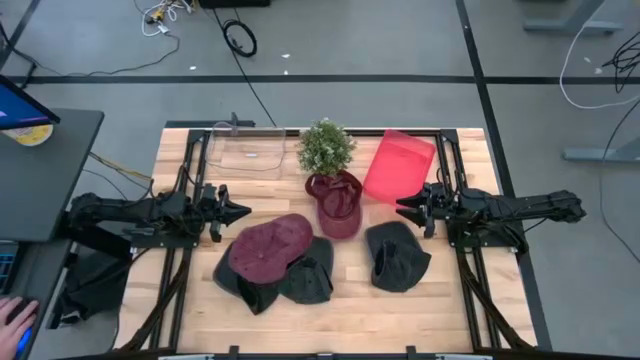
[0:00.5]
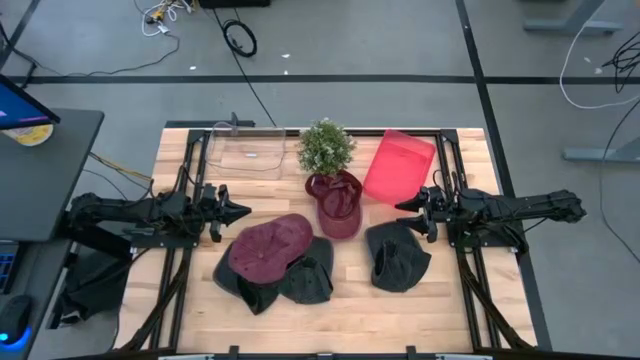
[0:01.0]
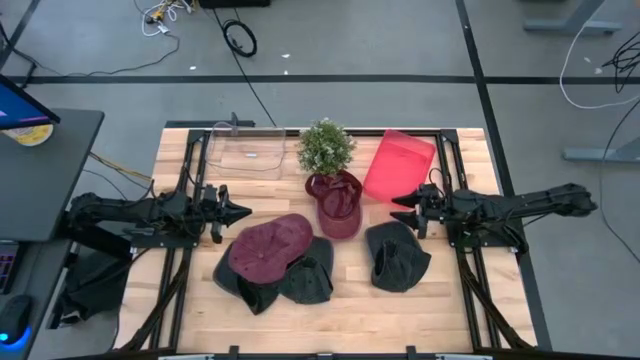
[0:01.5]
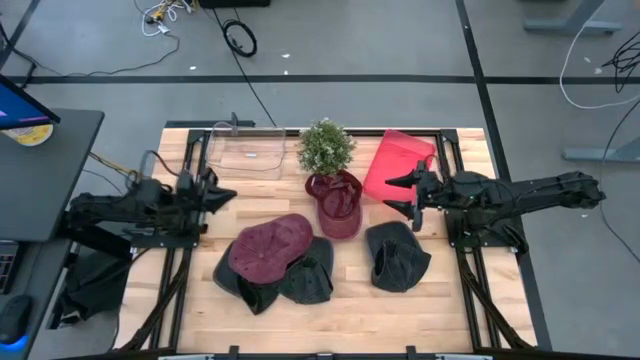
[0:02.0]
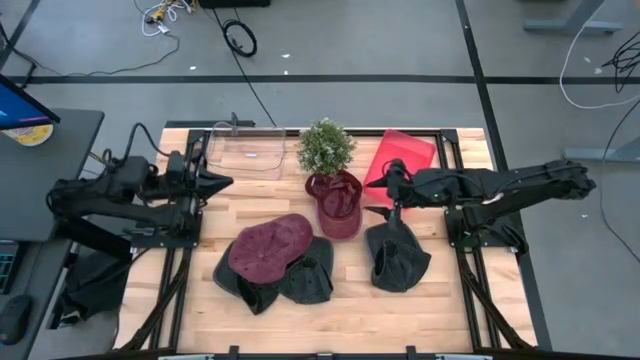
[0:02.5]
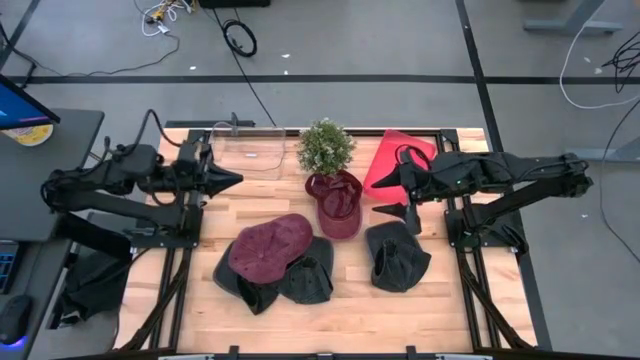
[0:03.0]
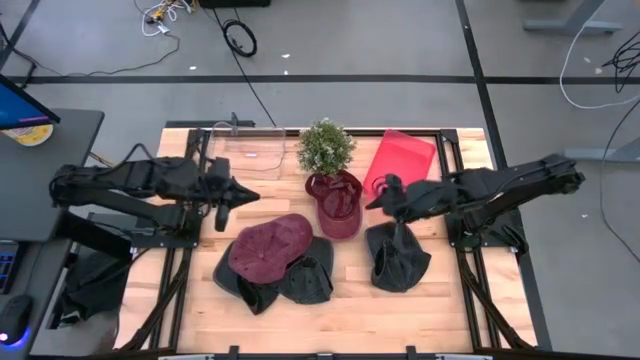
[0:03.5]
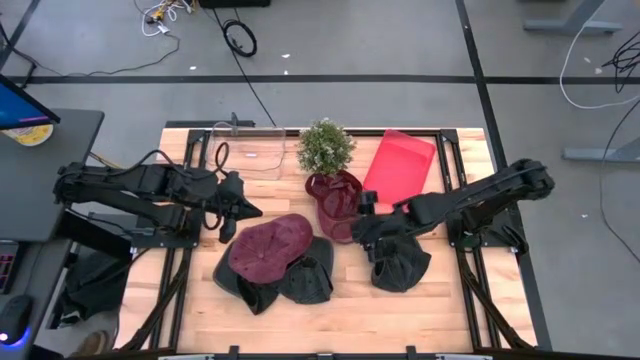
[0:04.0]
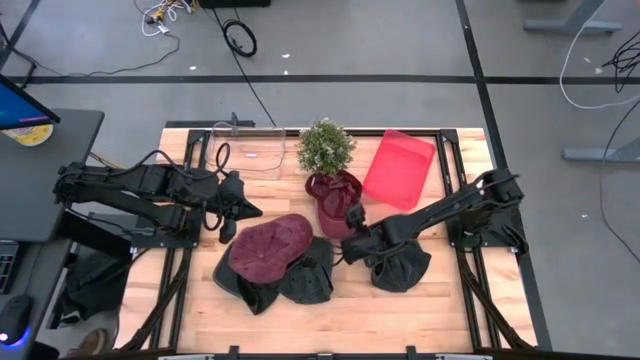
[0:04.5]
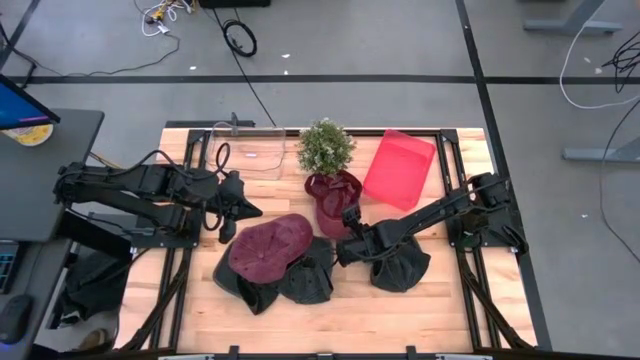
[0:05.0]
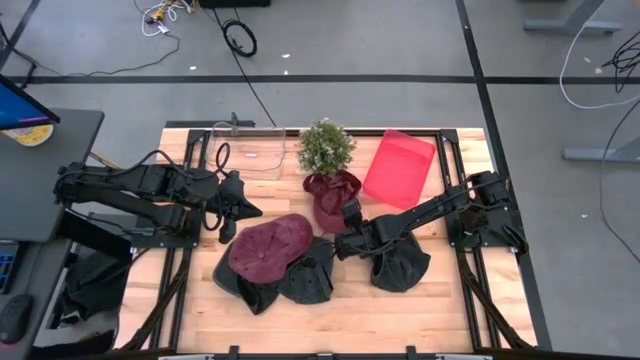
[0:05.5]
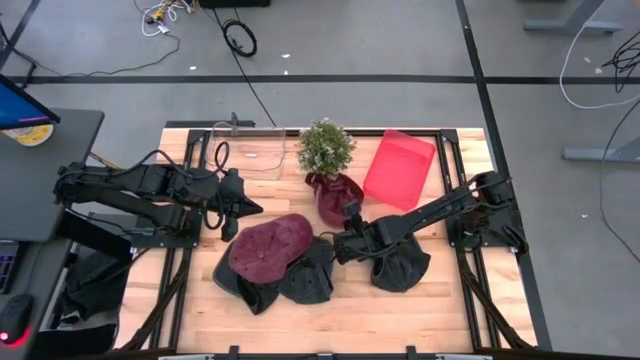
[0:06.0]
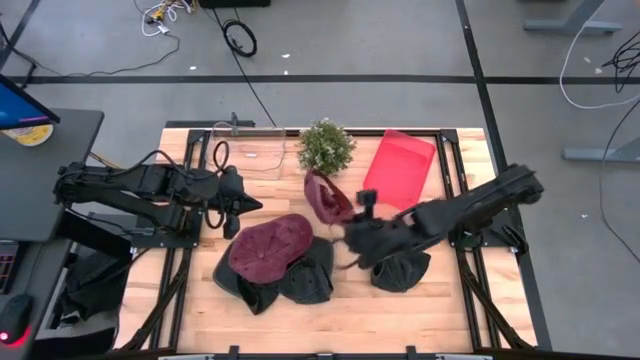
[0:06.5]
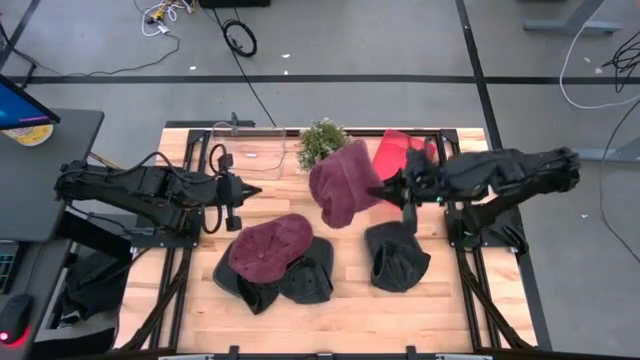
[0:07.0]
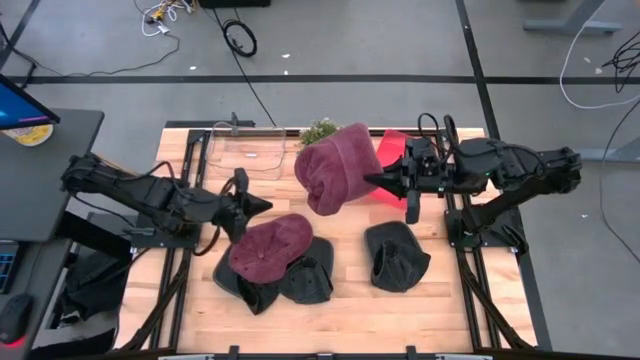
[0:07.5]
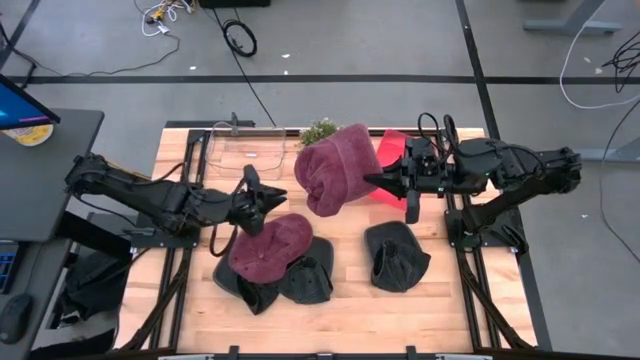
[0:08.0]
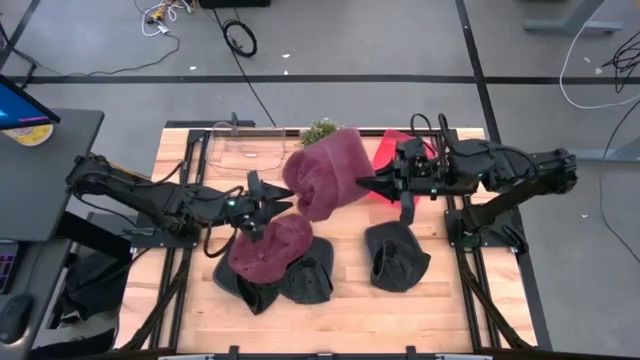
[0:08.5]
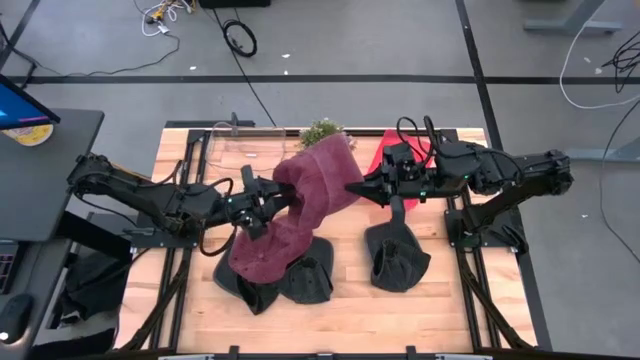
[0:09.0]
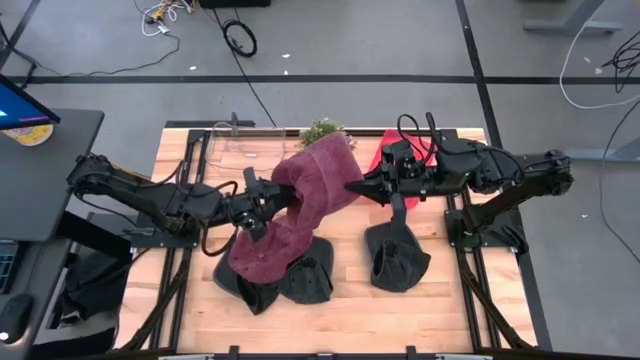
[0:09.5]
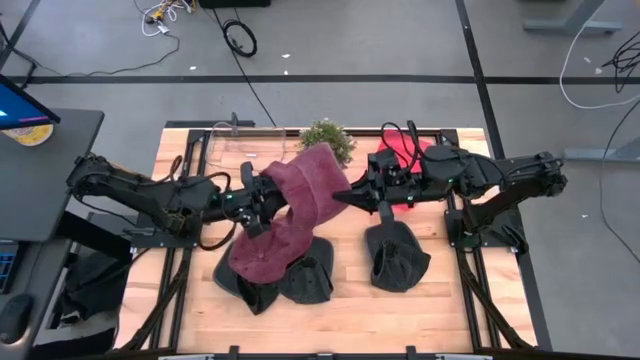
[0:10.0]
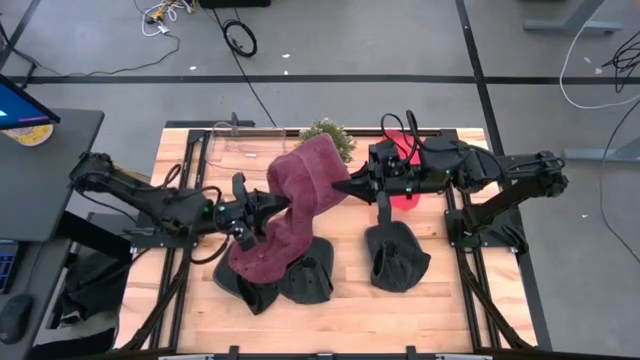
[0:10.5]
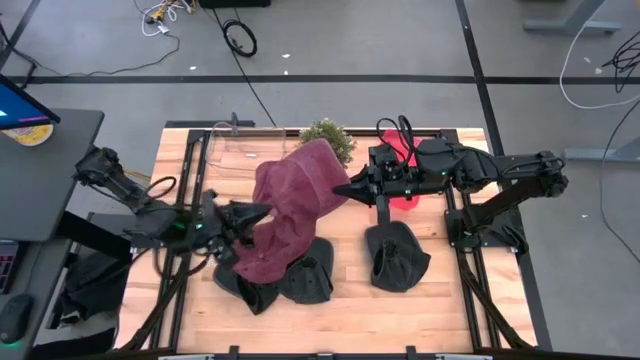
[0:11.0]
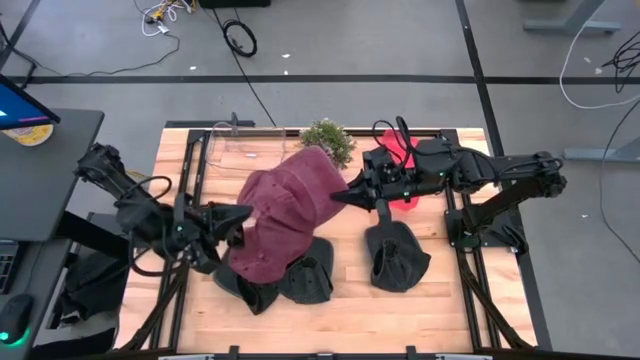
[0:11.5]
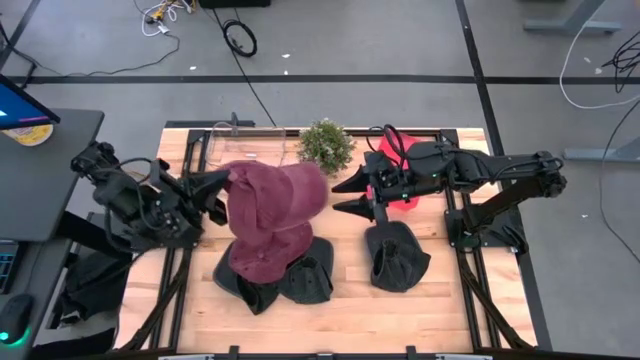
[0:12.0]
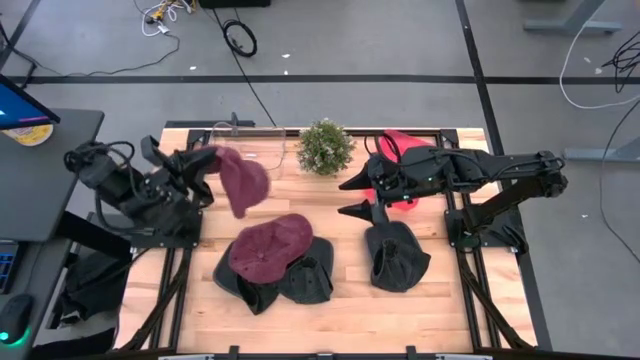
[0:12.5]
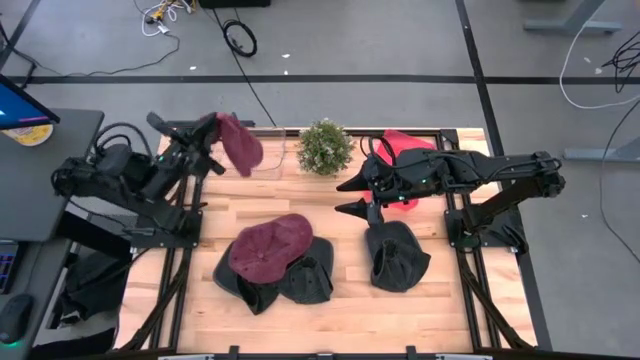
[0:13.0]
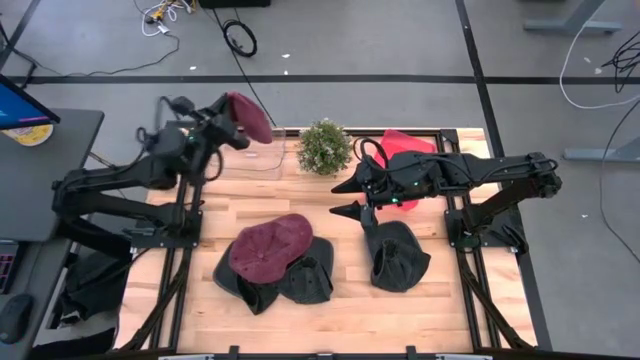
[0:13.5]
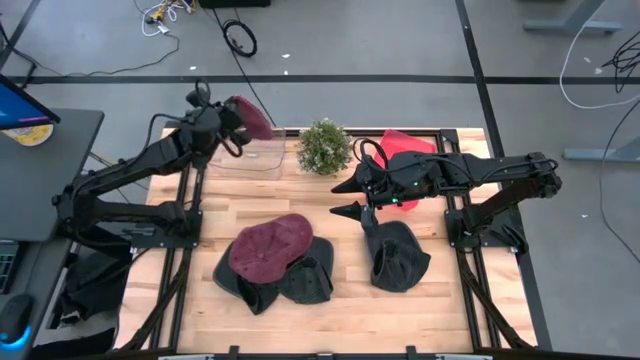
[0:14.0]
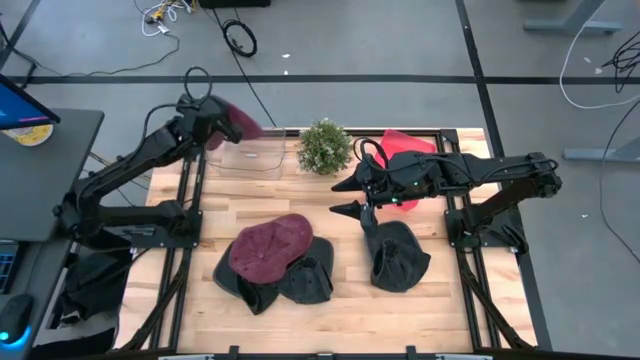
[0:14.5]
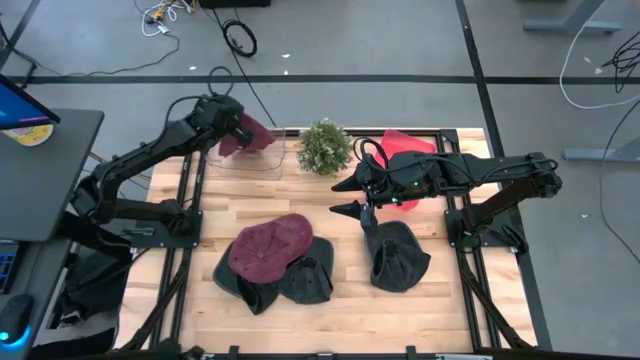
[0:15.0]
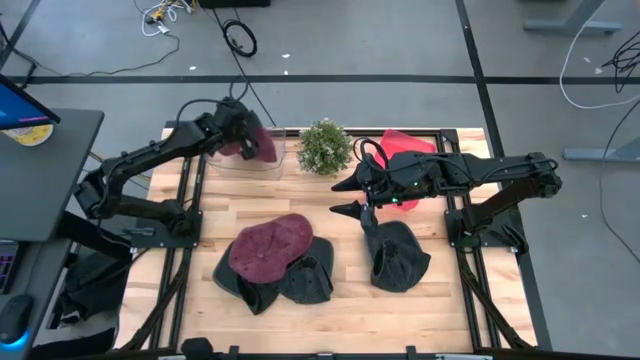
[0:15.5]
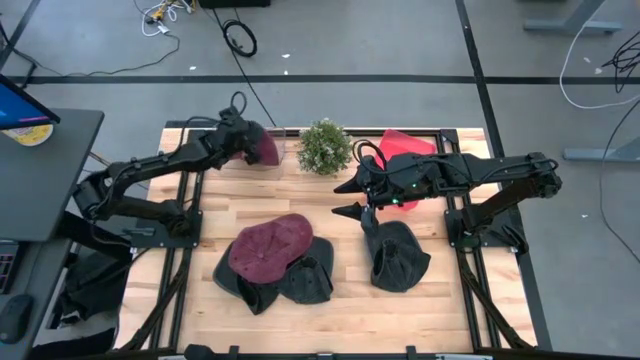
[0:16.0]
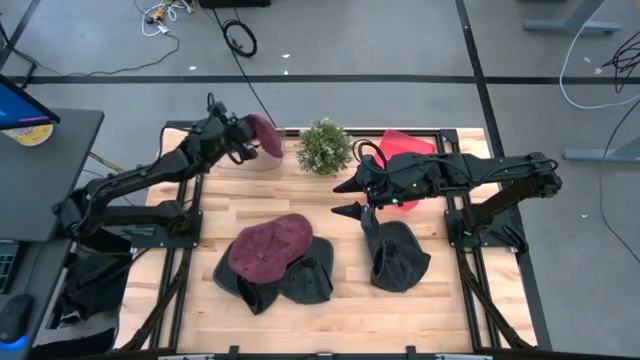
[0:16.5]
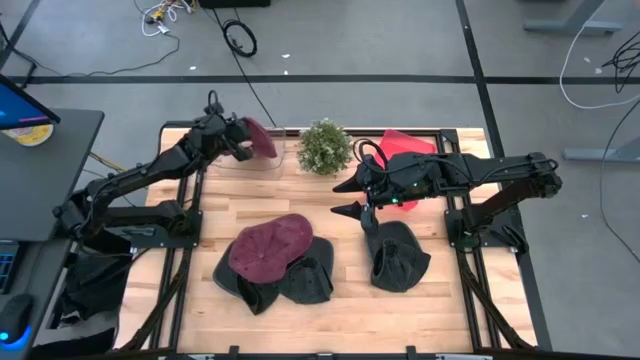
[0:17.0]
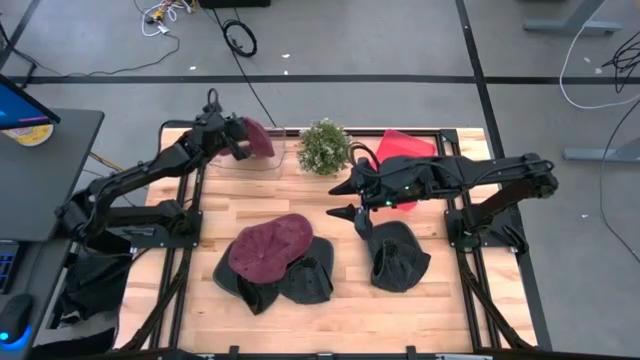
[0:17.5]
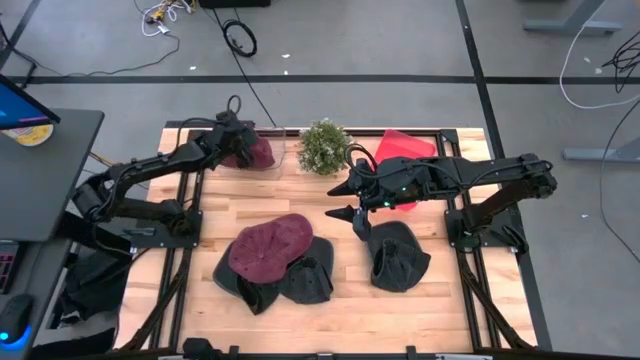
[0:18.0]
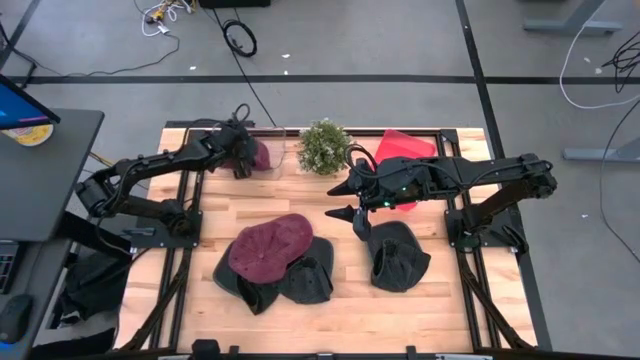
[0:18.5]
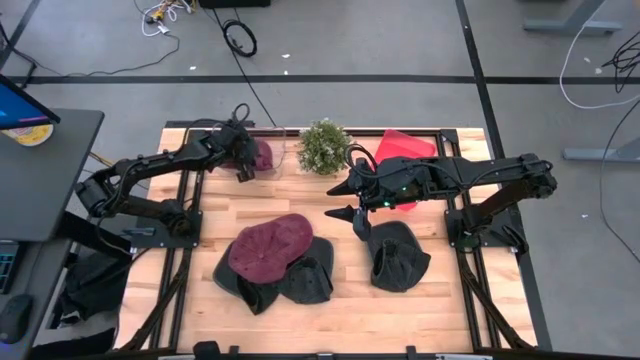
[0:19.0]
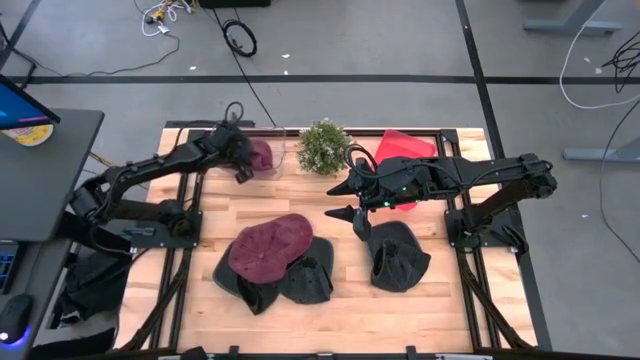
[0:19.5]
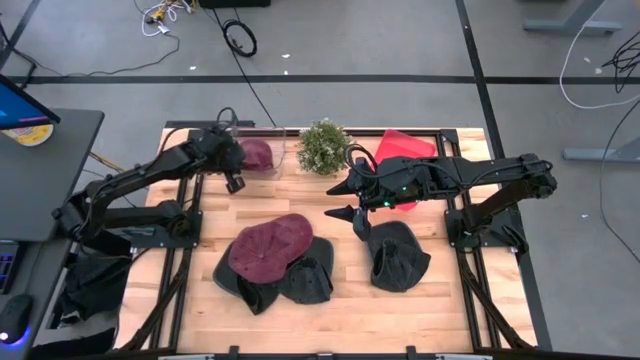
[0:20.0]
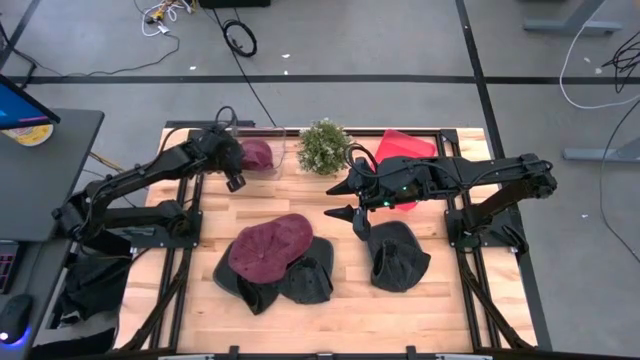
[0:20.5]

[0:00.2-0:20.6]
Task: Pick & Place hat
Put the right red cap into the transparent bin
